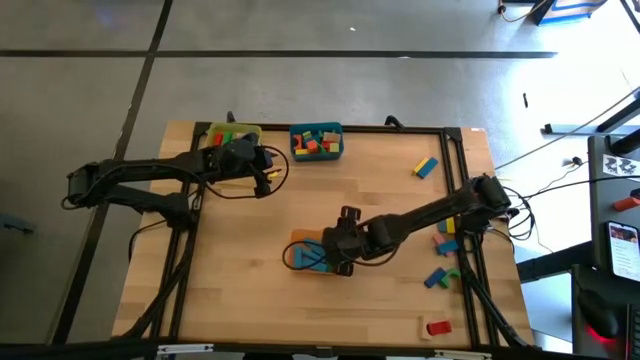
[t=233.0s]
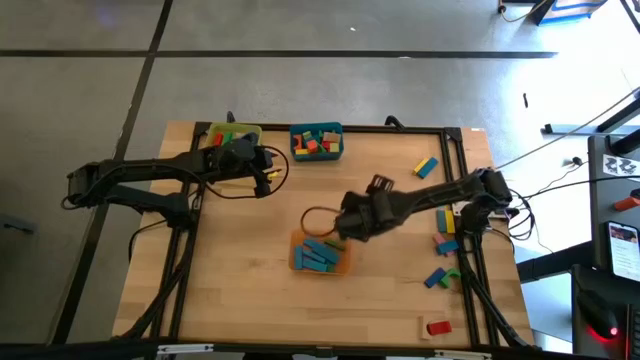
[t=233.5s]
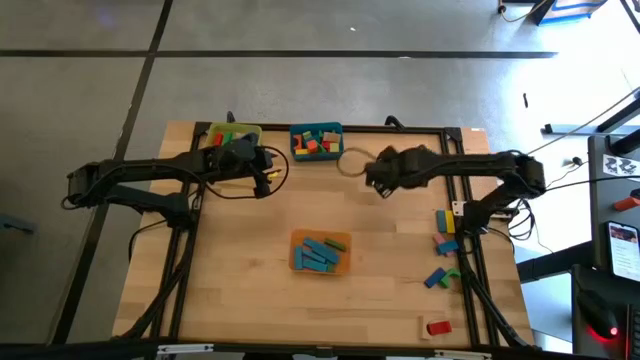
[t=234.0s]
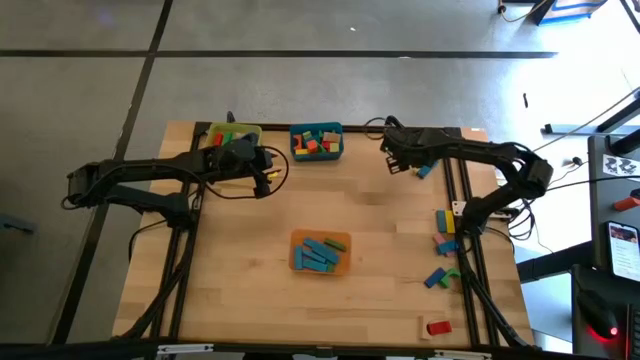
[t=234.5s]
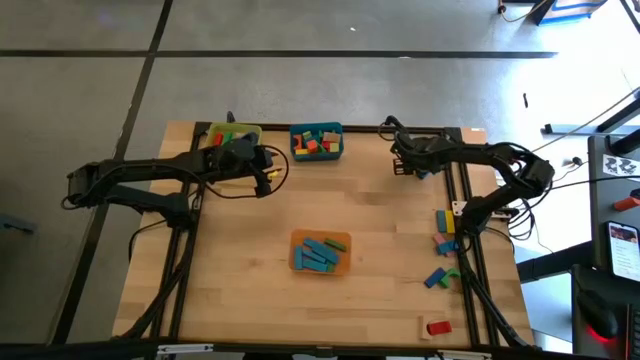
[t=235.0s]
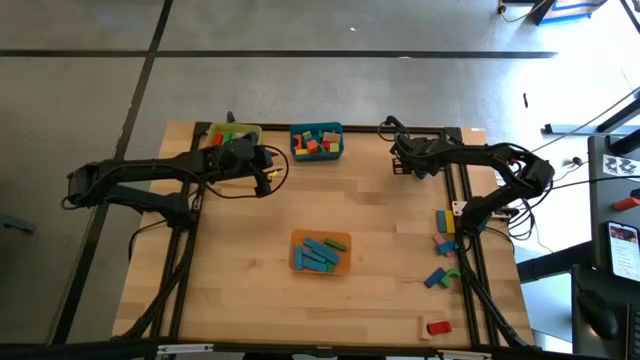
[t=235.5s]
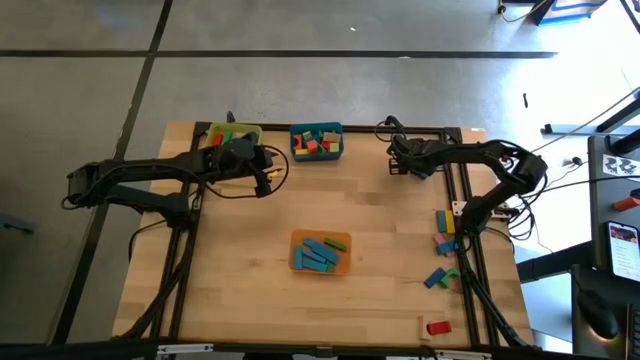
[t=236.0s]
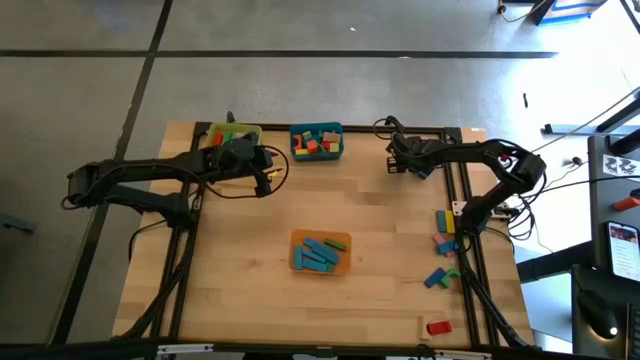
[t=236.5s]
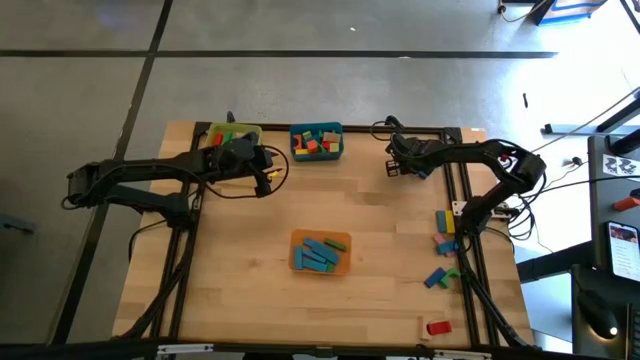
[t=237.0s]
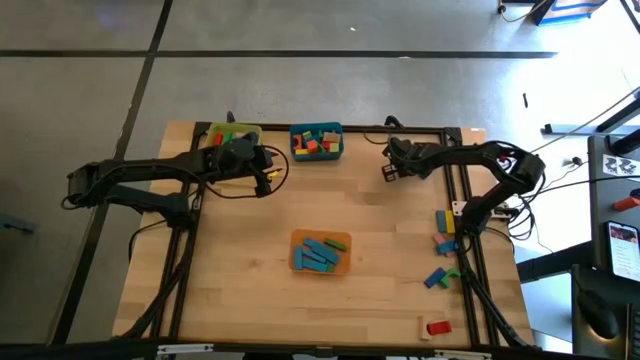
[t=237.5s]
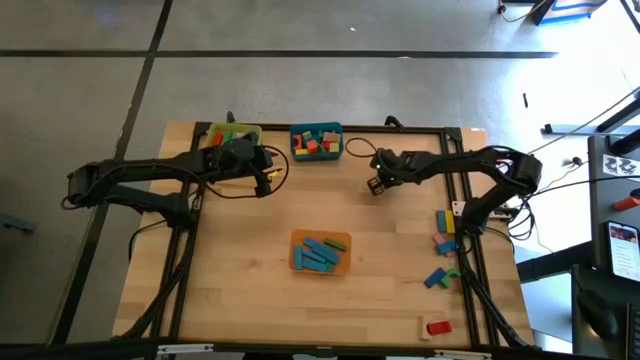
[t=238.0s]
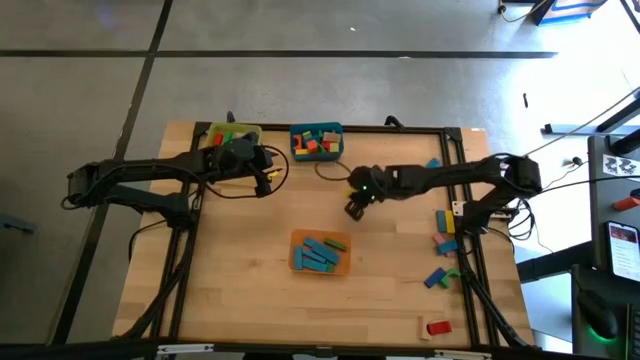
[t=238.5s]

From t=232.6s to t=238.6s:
Task: Sort blocks by size
Put the yellow rectangular block into the orange bin

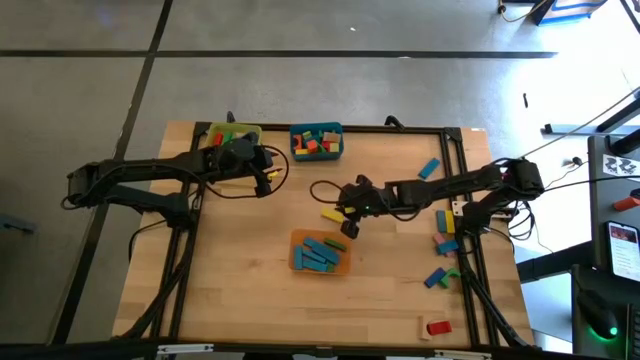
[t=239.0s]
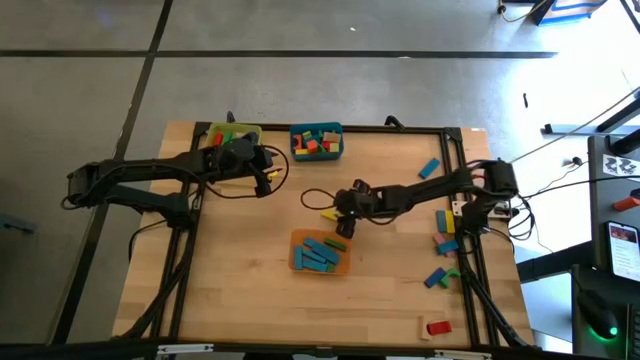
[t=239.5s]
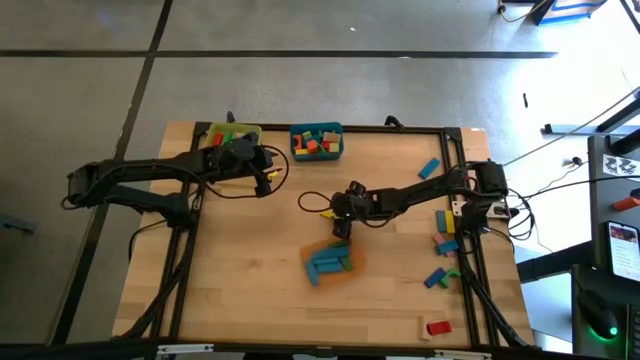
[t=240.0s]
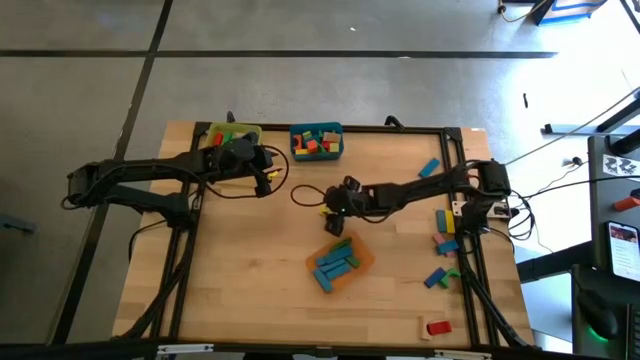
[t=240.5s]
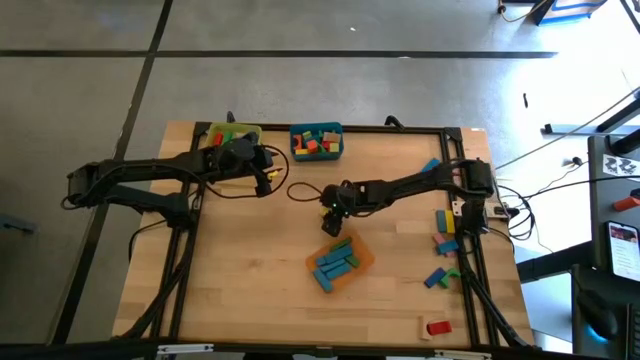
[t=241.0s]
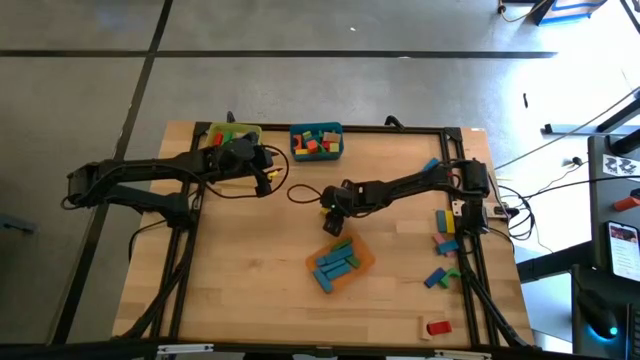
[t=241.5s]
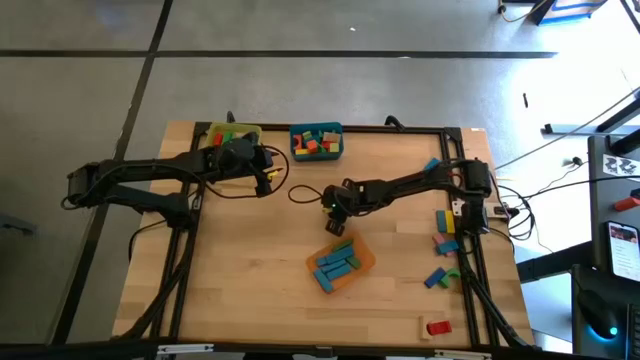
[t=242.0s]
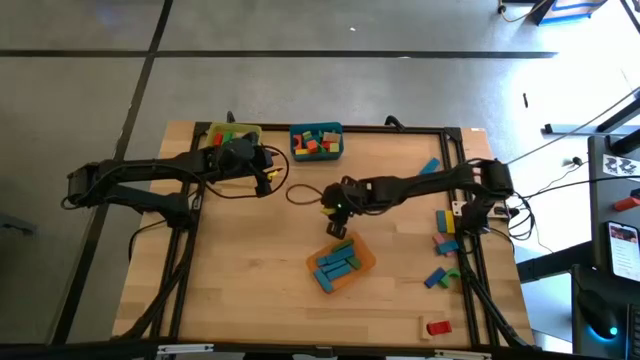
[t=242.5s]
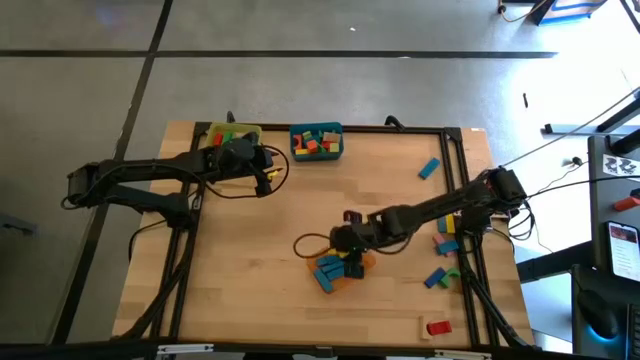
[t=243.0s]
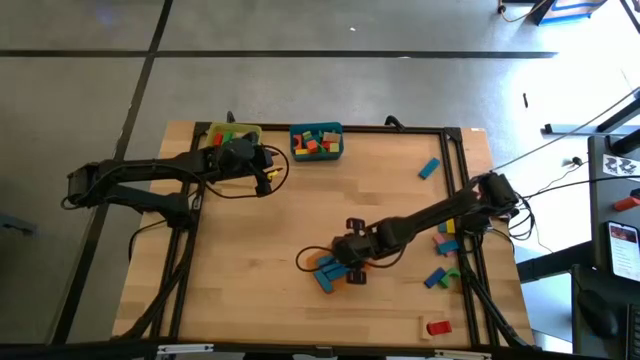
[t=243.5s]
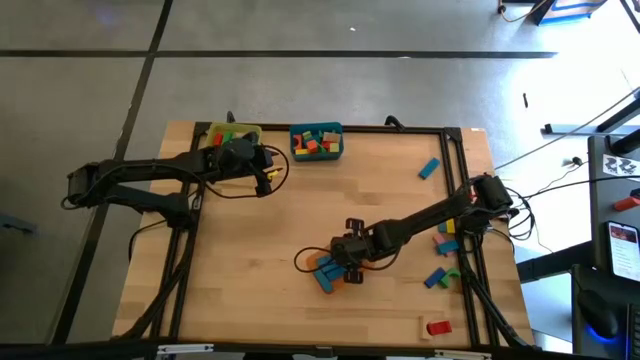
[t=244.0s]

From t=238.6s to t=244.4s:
Put the yellow rectangular block into the orange bin

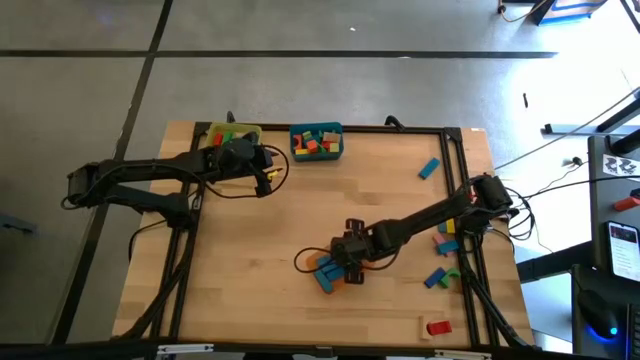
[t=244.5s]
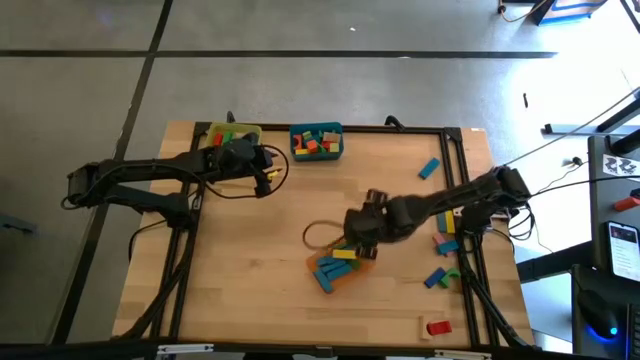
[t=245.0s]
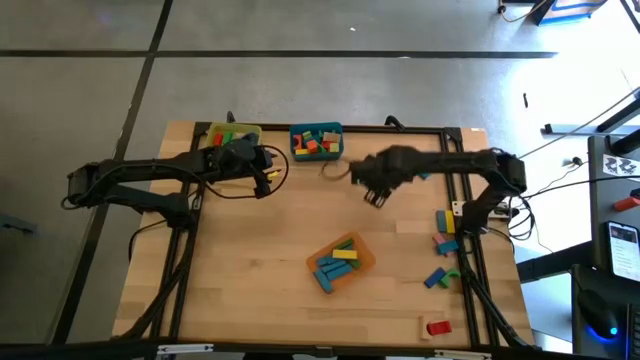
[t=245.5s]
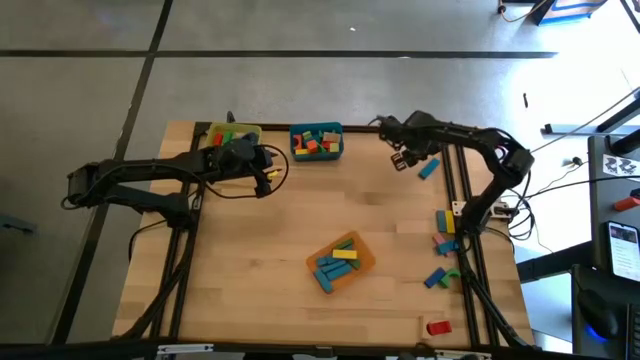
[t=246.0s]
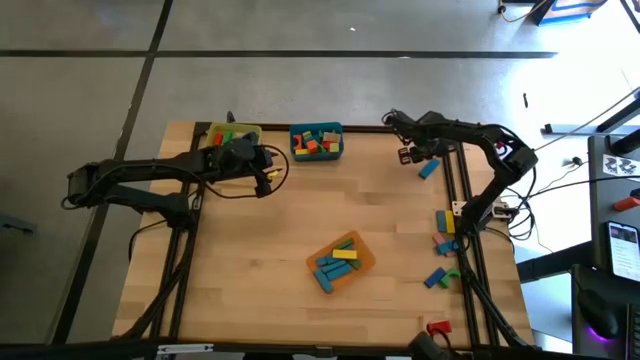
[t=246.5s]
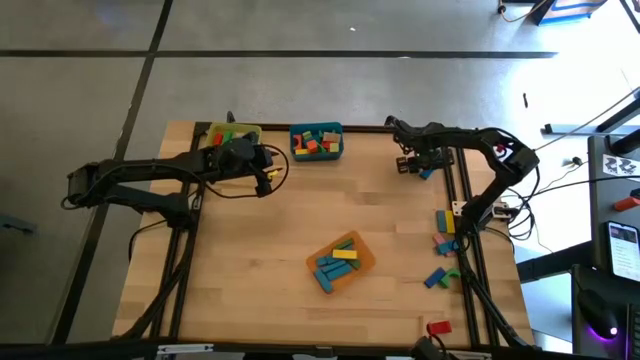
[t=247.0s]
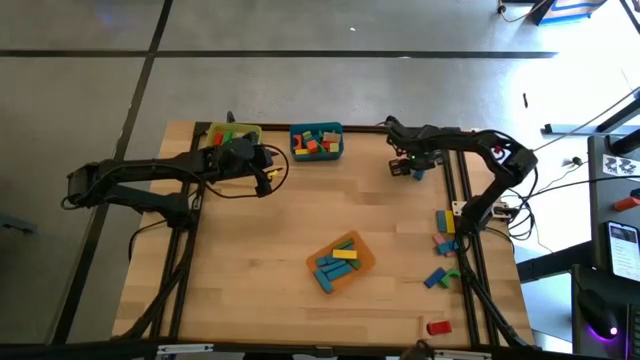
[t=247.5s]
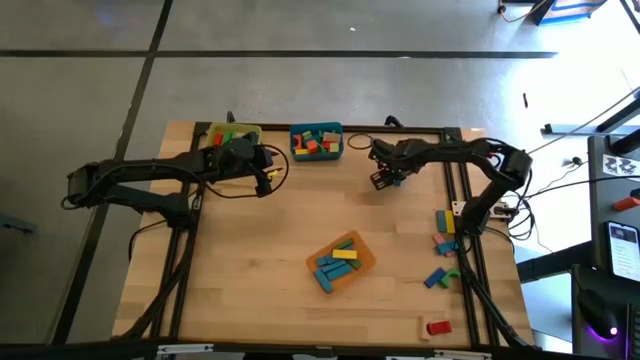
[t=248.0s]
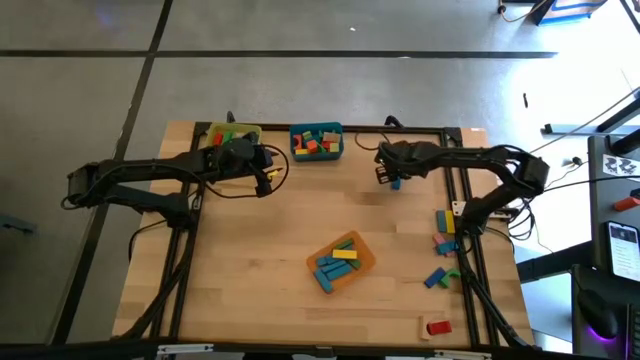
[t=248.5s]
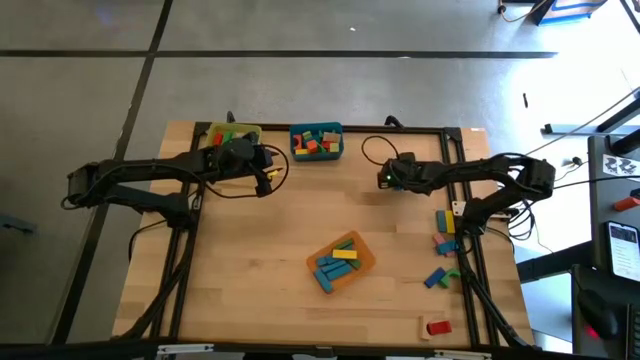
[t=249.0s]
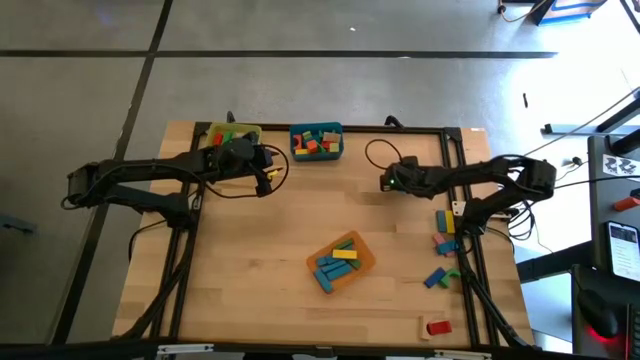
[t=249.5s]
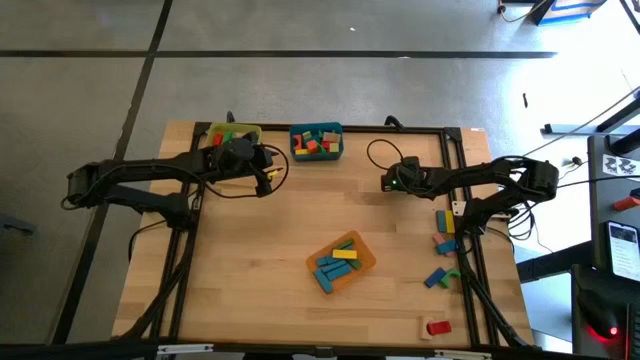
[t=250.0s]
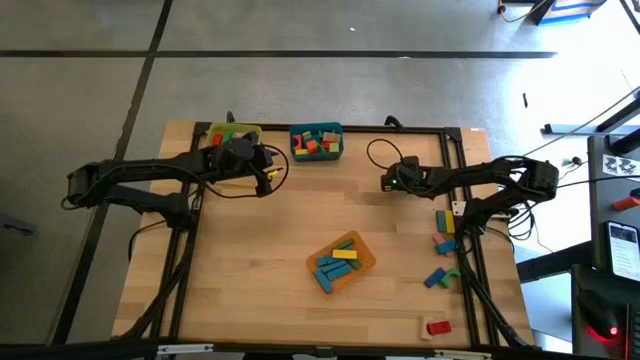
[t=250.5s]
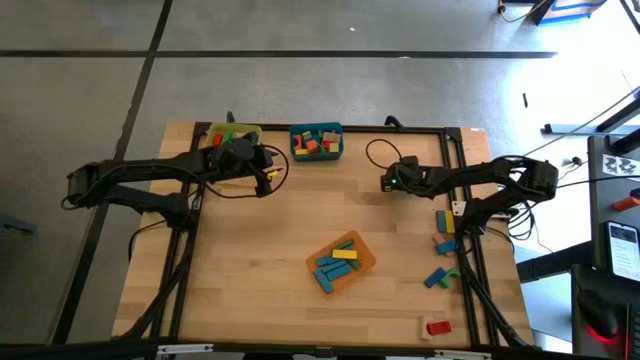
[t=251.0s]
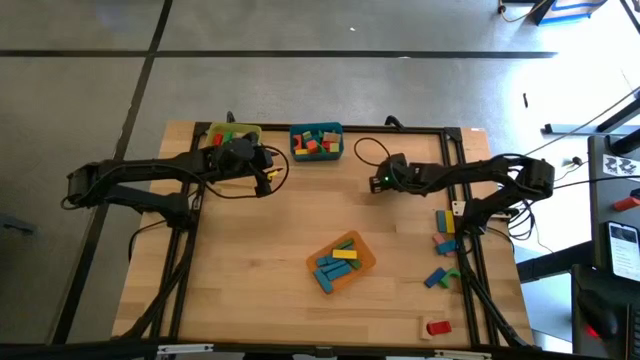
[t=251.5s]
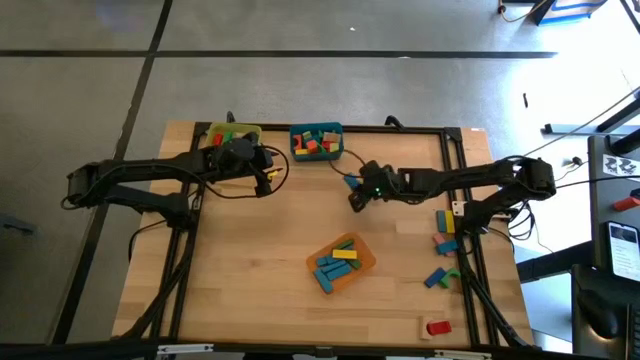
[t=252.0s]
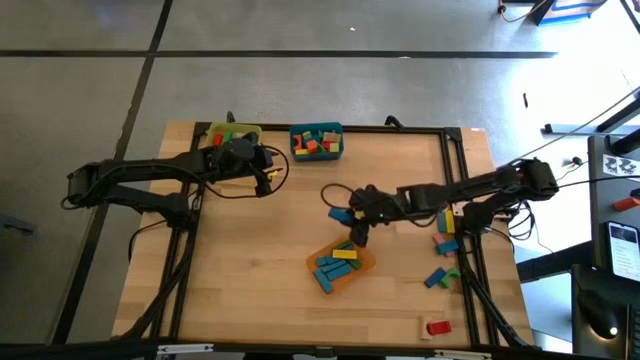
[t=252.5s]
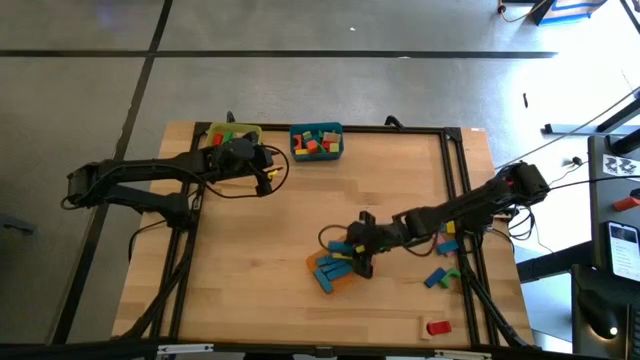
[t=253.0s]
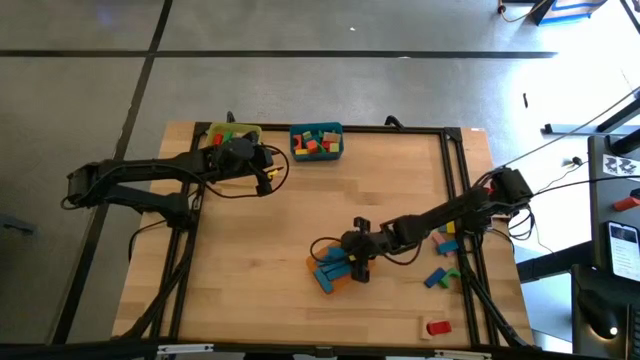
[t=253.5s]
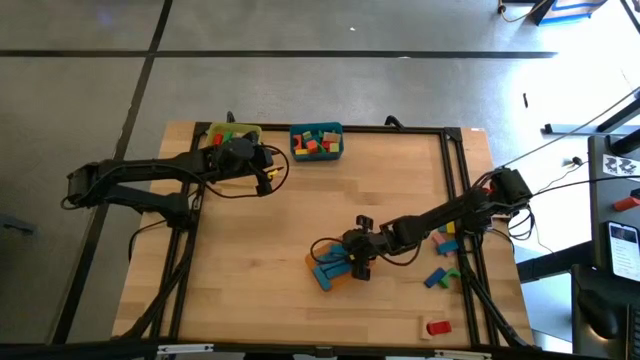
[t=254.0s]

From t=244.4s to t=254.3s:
Put the blue rectangular block into the orange bin
